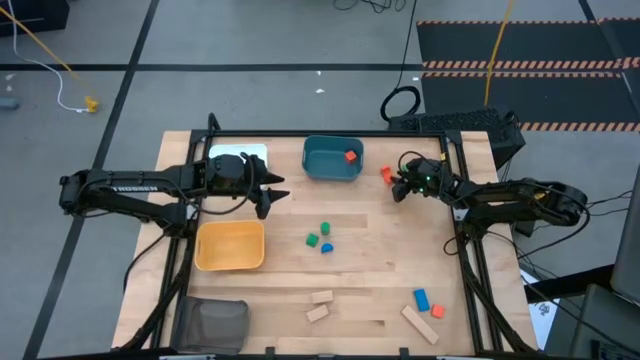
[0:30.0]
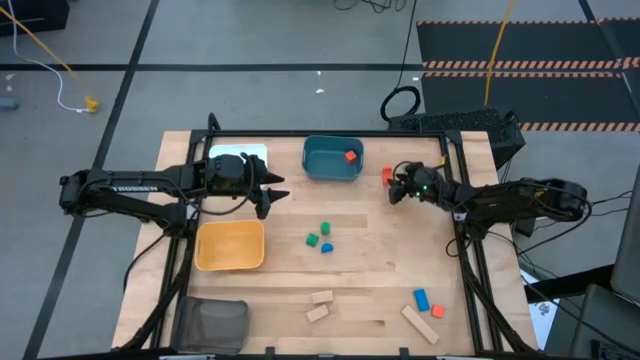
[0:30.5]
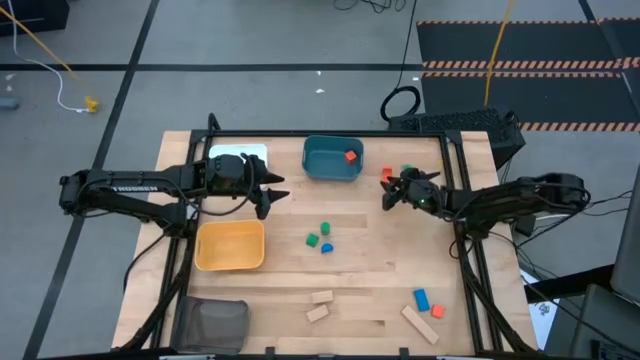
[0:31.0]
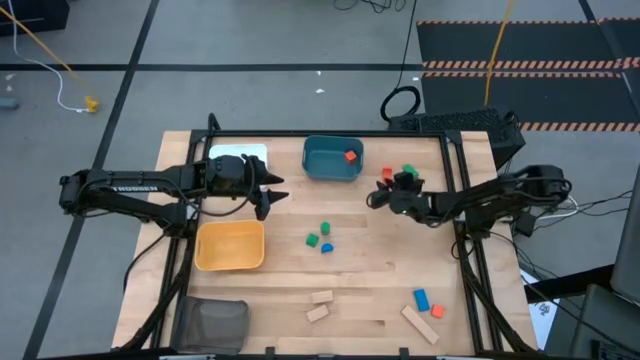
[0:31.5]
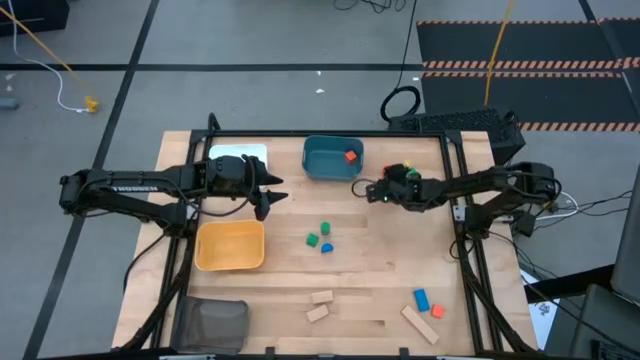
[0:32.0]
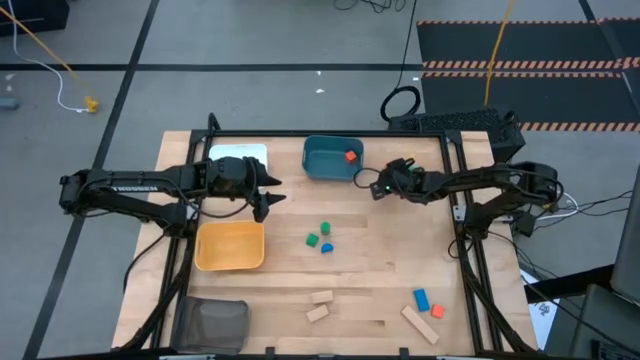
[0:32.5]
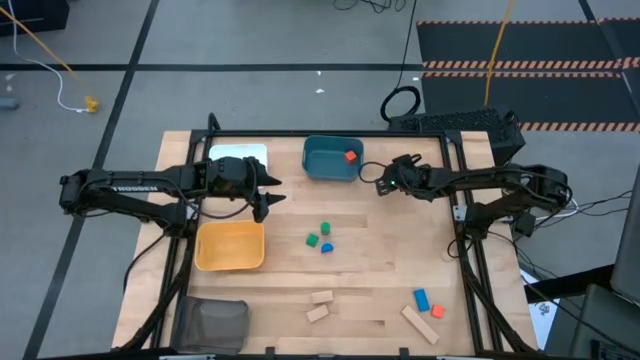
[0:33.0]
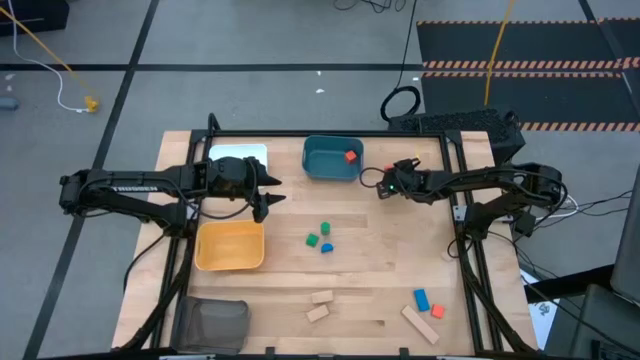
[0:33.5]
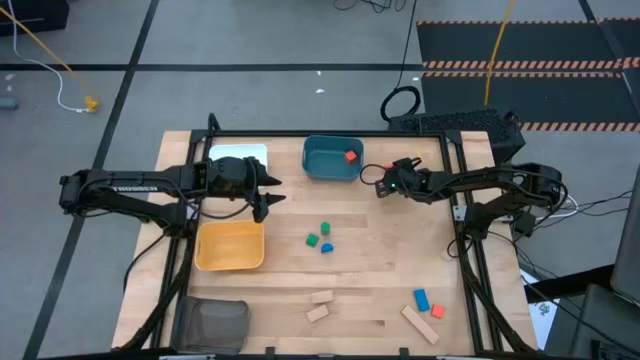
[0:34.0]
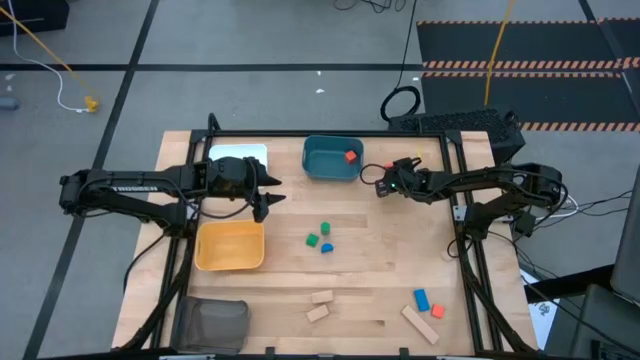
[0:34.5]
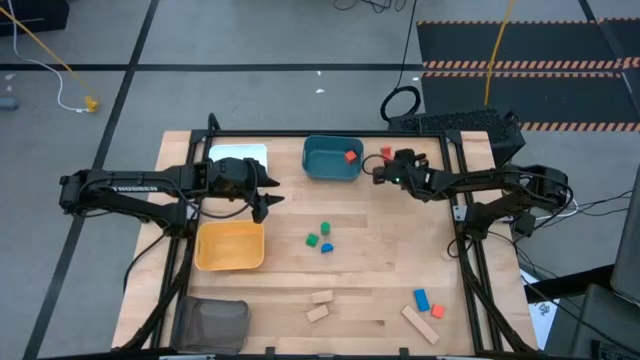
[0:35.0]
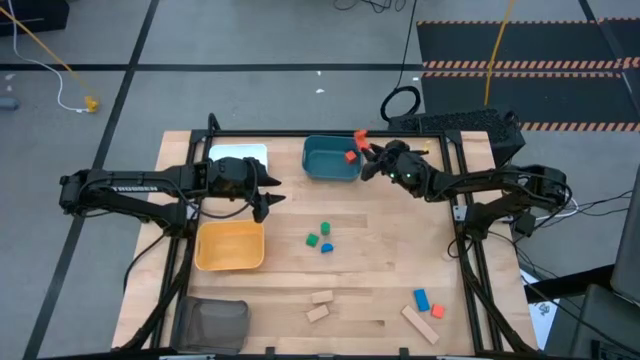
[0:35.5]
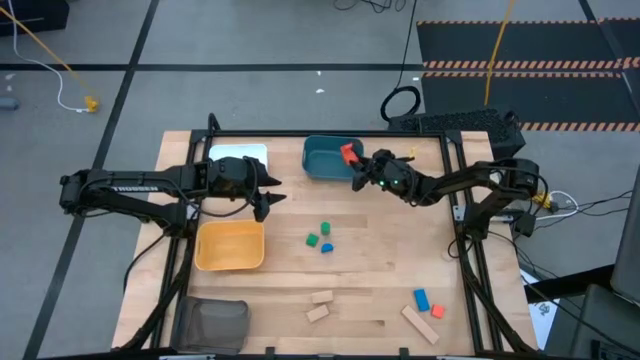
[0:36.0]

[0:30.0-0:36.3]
Task: Sort & place blocks by color
Put the top orange wooden block into the blue bin

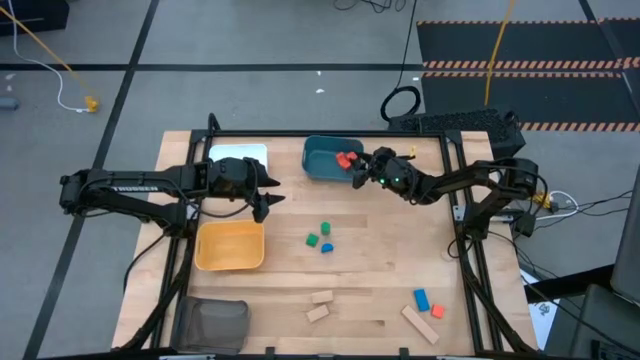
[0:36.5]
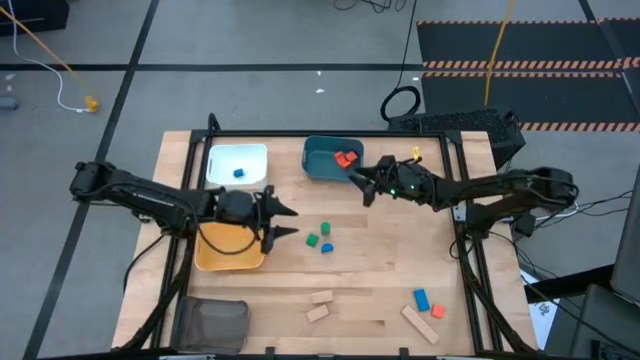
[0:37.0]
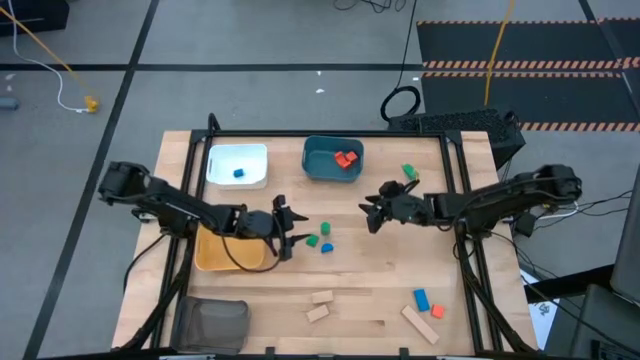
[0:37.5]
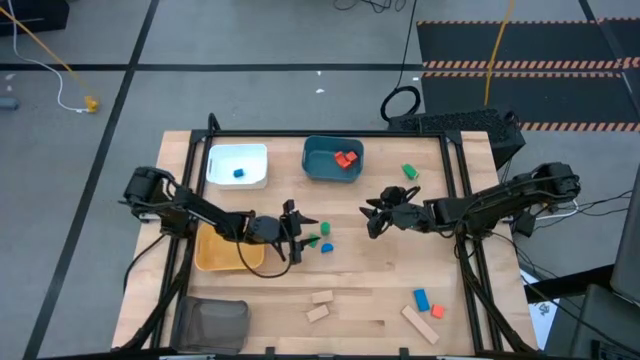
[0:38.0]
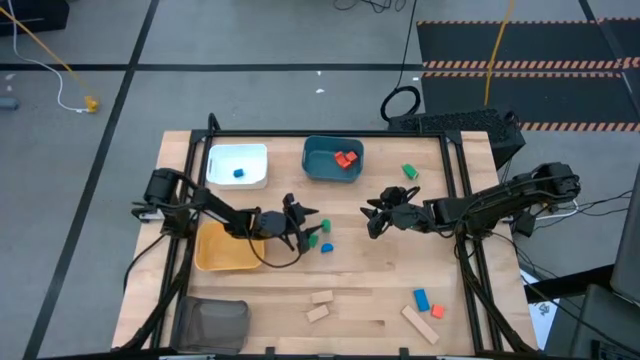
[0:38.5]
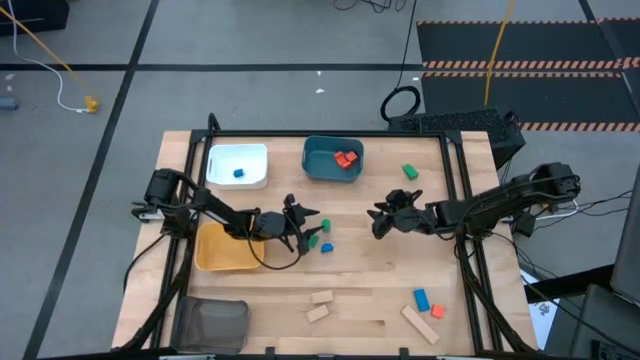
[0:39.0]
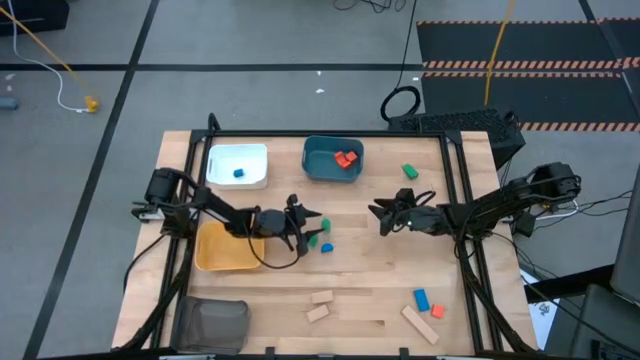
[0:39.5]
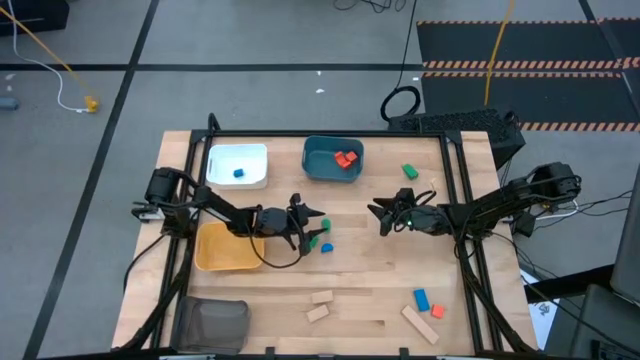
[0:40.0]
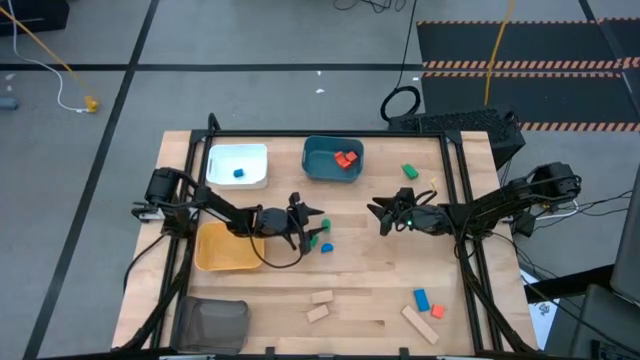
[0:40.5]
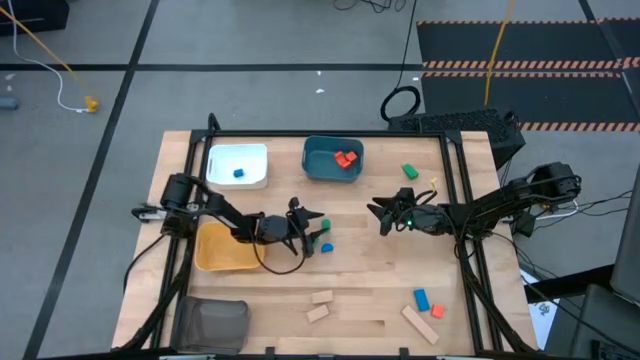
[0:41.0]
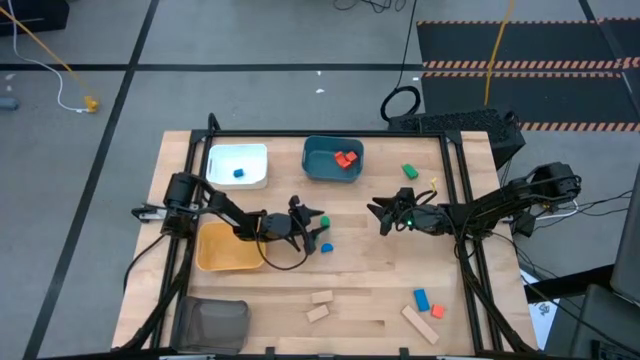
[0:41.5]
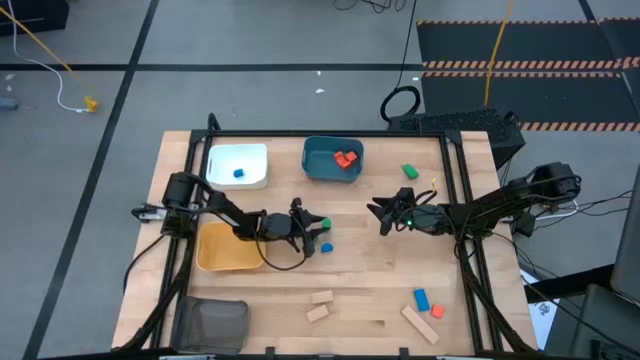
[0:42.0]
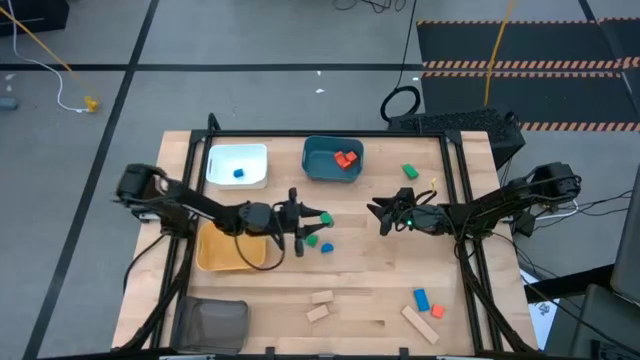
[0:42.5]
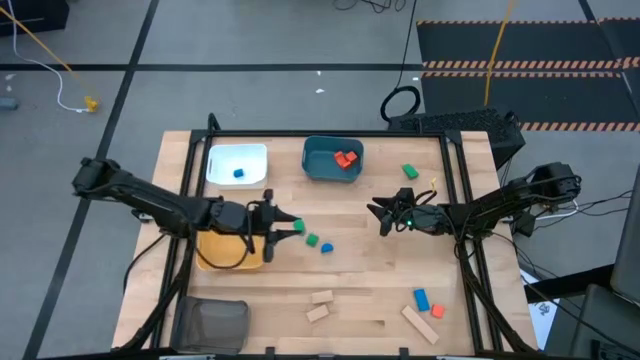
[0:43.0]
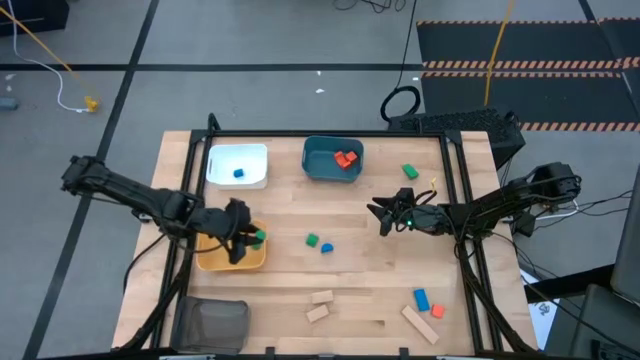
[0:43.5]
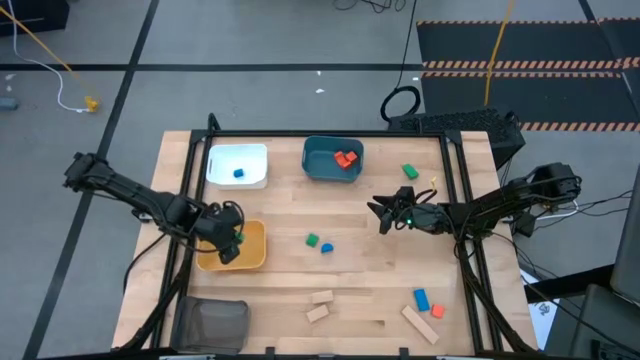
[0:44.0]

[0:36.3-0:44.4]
Put the top left green wooden block into the yellow bin

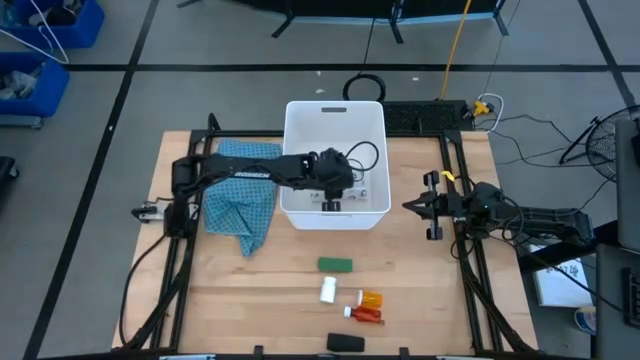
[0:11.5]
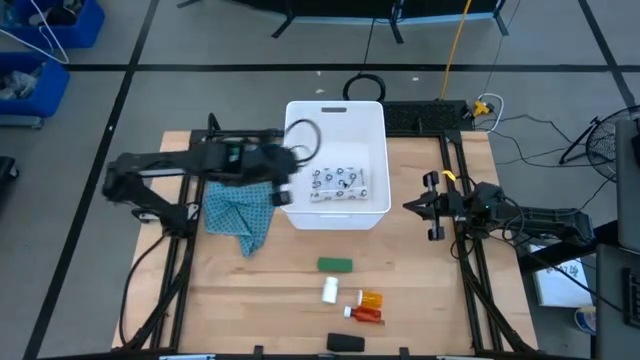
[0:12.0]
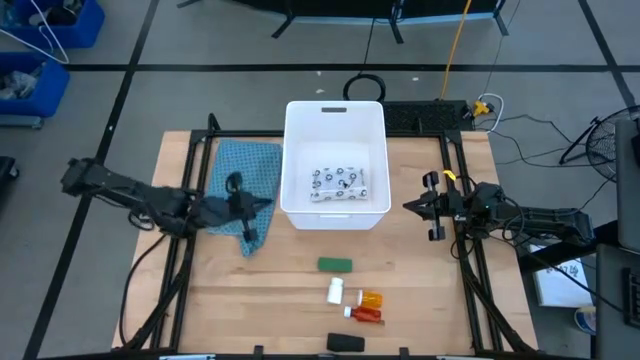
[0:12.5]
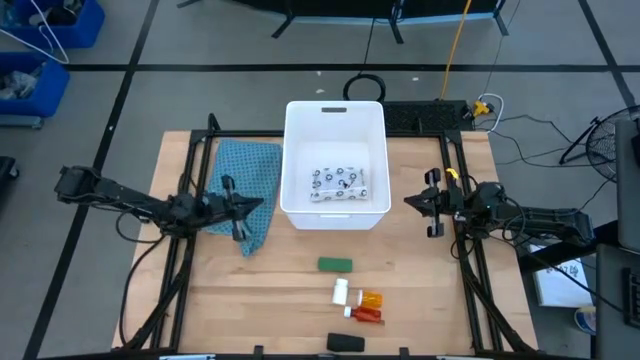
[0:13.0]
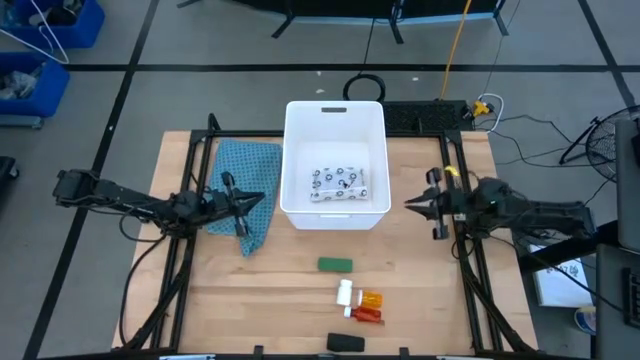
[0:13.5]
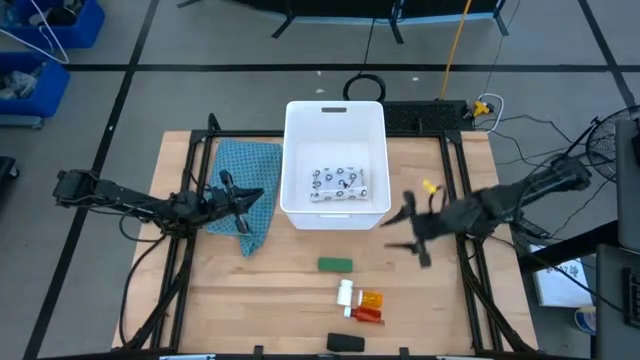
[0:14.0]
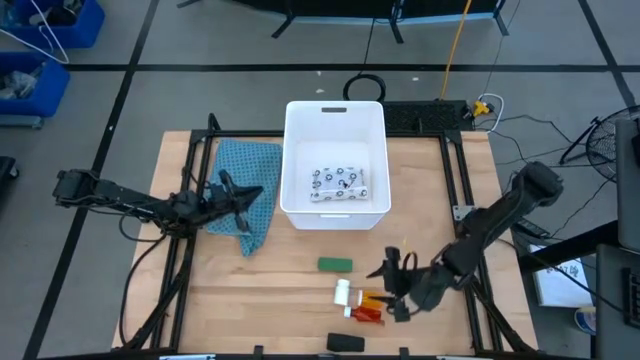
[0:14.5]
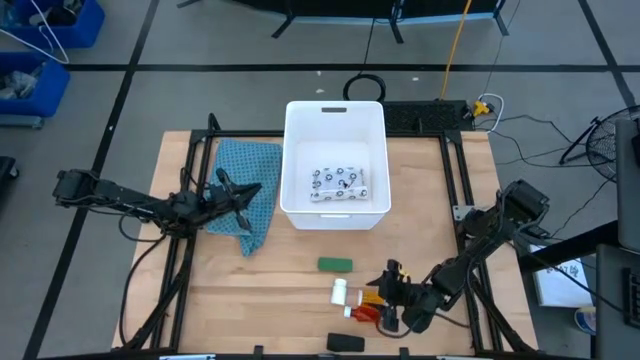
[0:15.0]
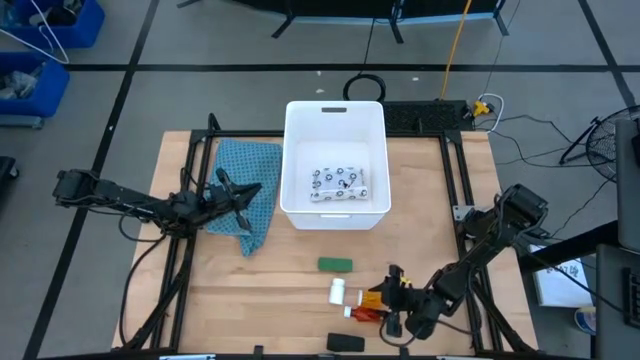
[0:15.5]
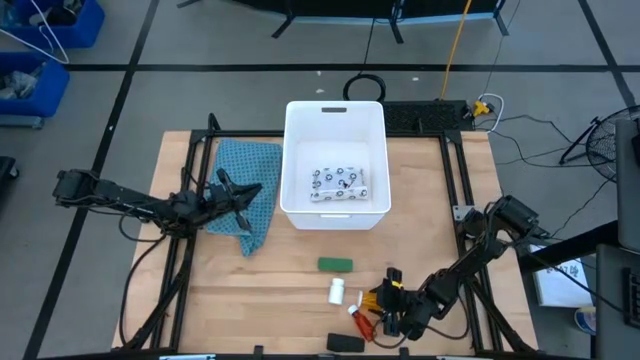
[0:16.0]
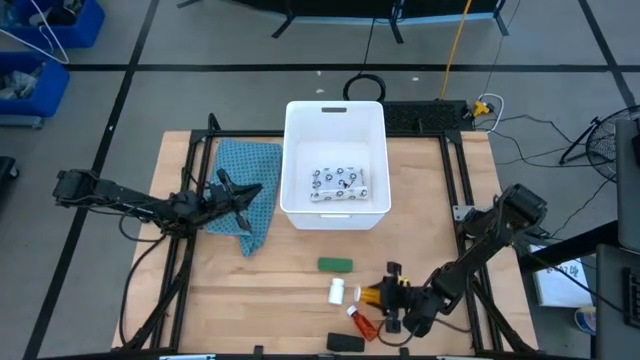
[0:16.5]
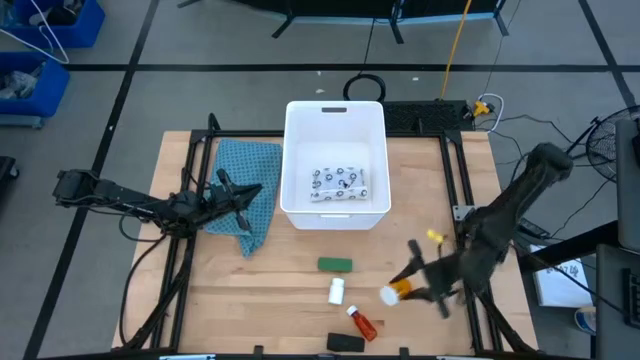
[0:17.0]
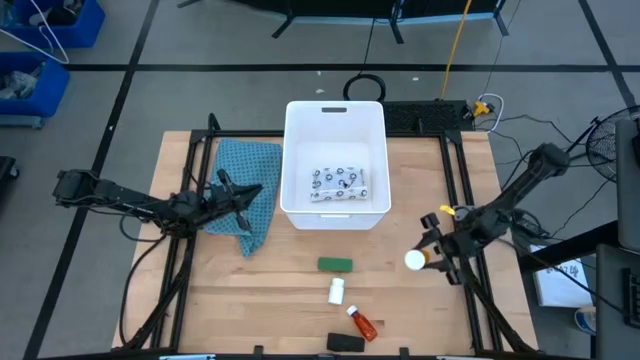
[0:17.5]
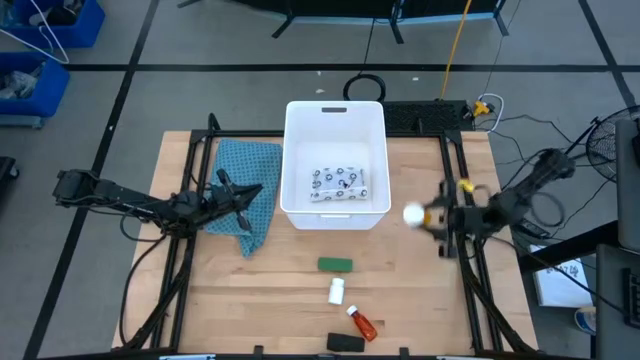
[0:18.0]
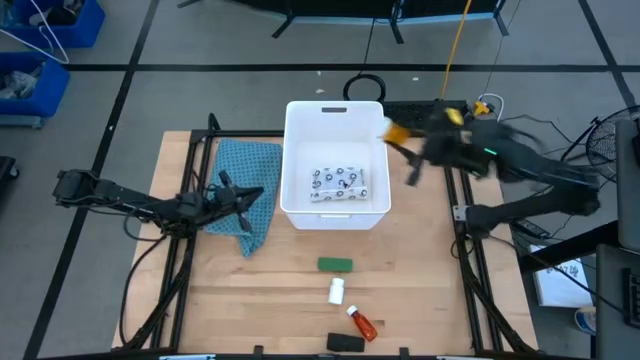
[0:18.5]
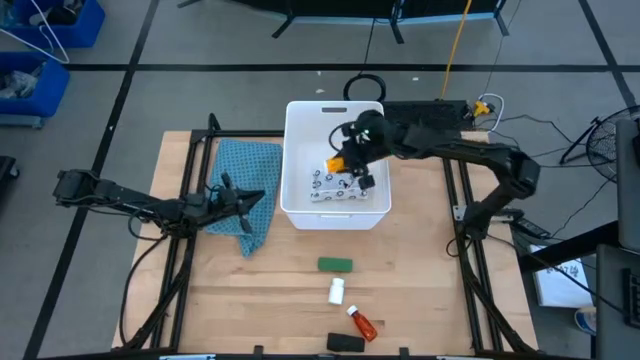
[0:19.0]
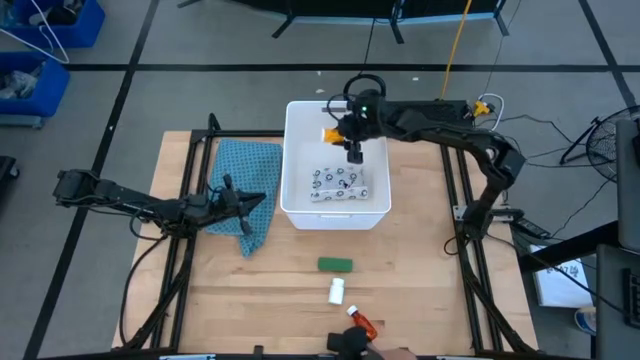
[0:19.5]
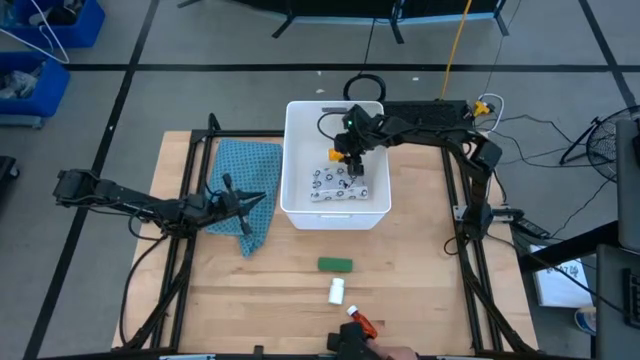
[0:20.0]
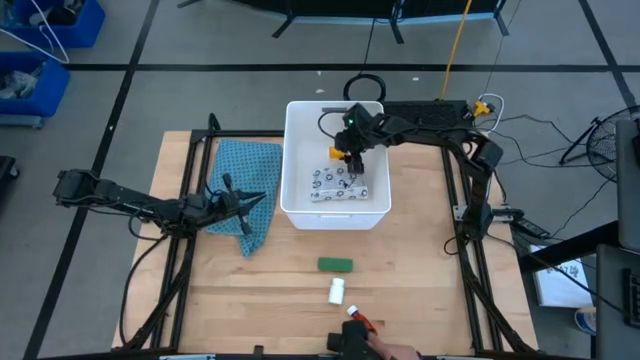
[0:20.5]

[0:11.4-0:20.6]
Task: Pick & place medical supplies in basket/bin
Put the orange medicine bottle into the white bin
